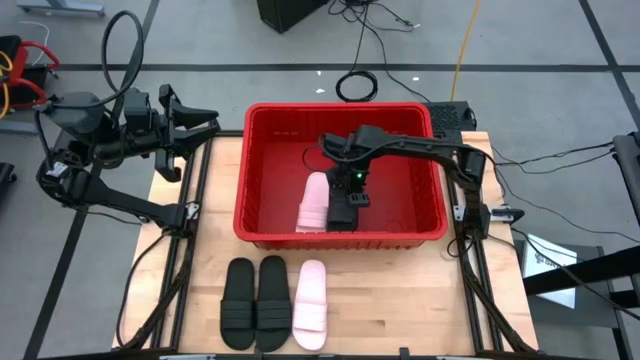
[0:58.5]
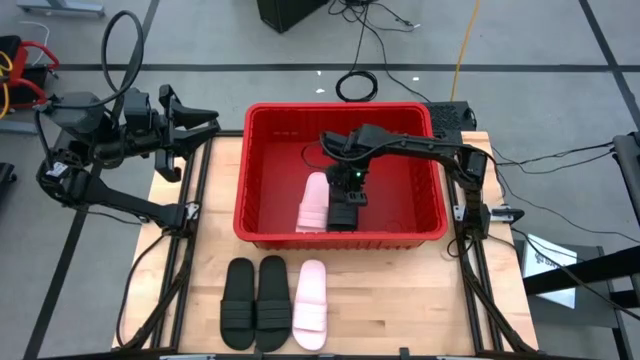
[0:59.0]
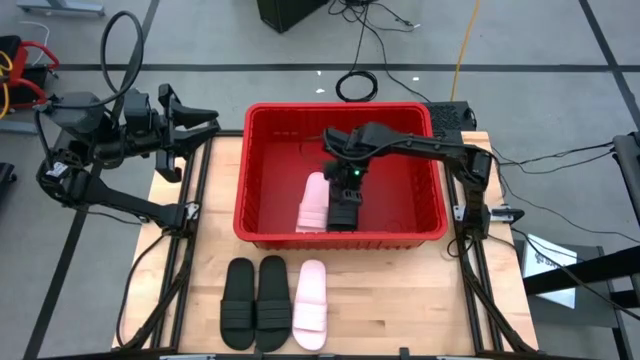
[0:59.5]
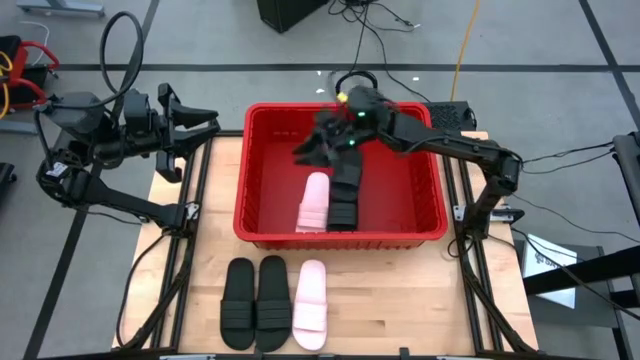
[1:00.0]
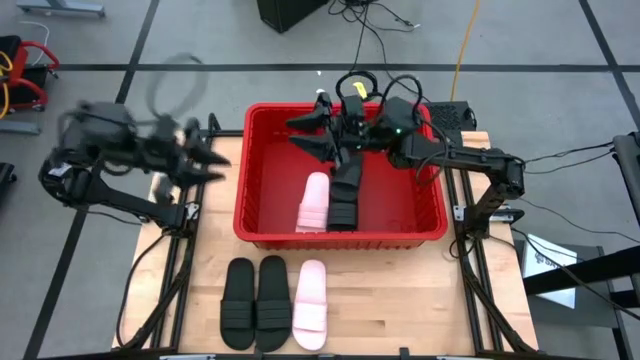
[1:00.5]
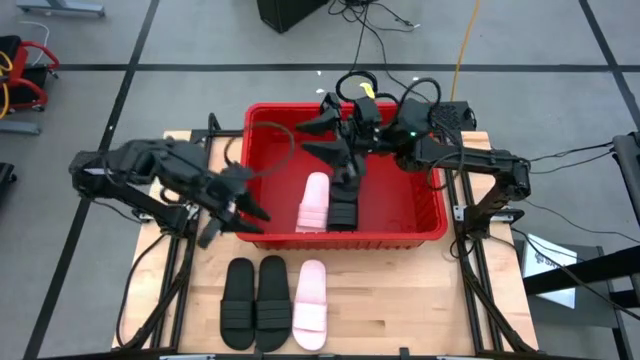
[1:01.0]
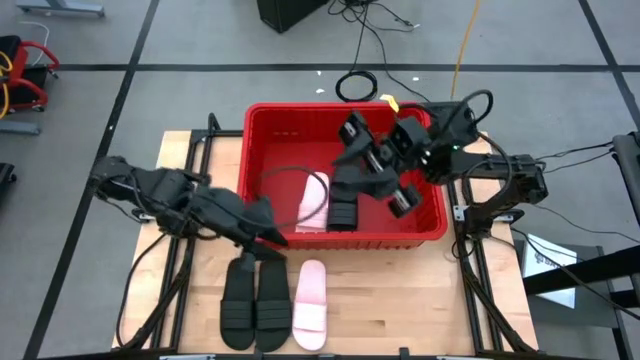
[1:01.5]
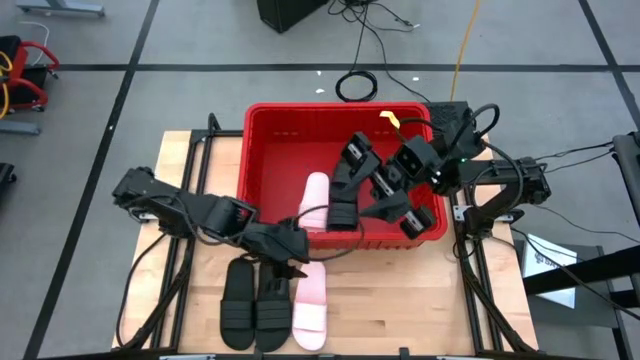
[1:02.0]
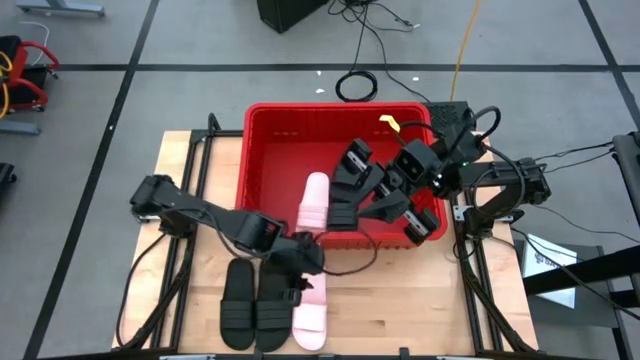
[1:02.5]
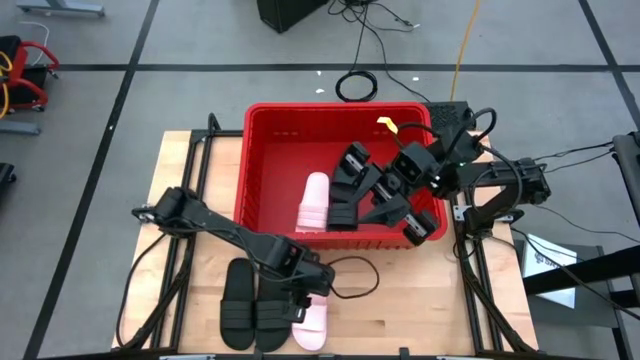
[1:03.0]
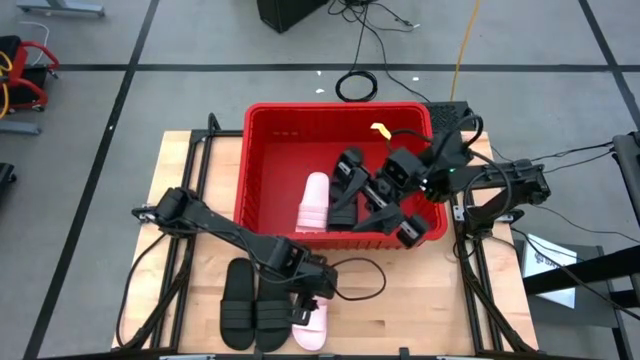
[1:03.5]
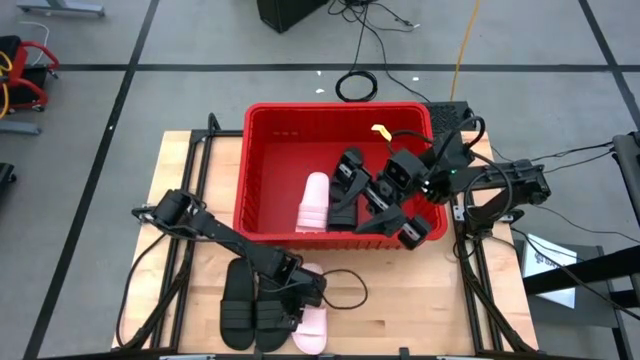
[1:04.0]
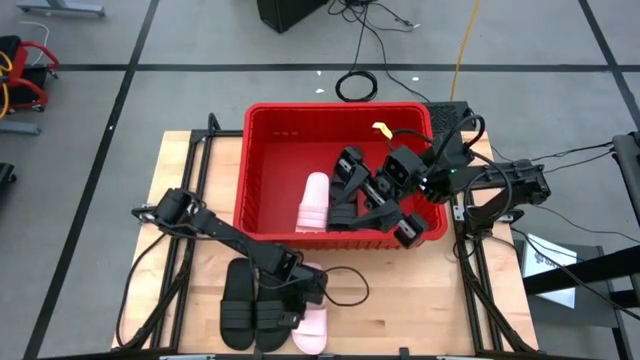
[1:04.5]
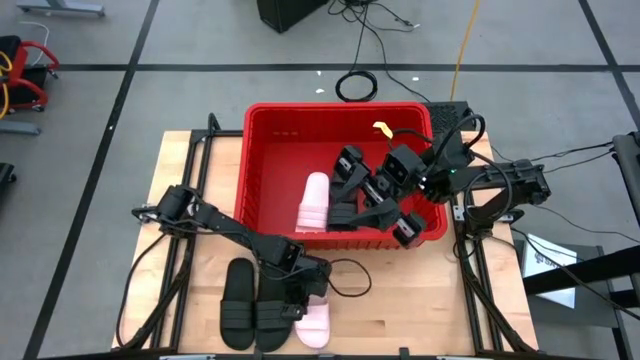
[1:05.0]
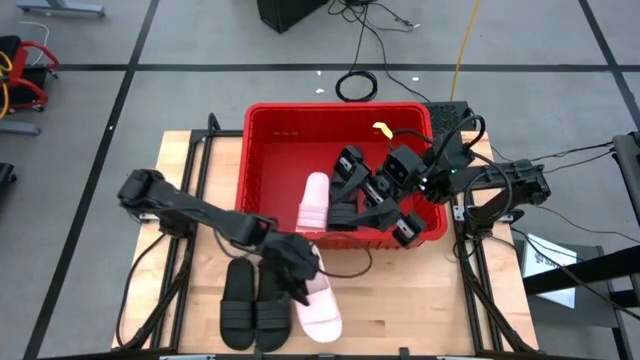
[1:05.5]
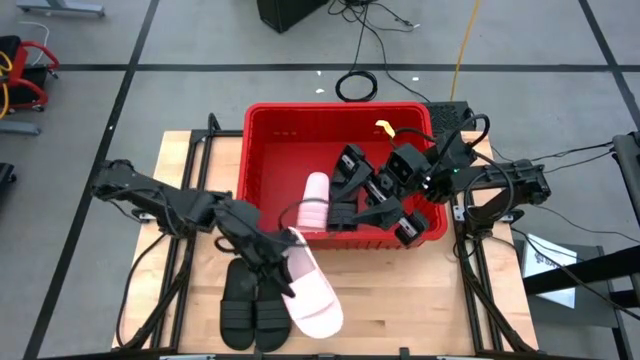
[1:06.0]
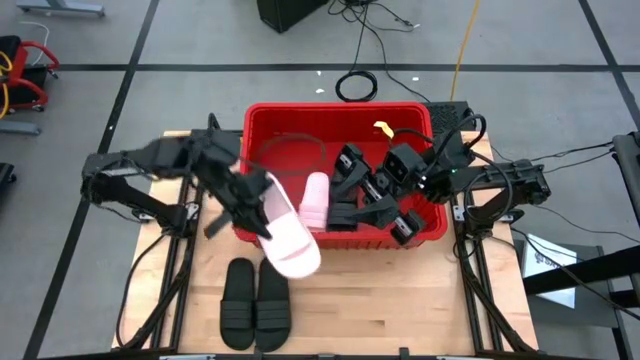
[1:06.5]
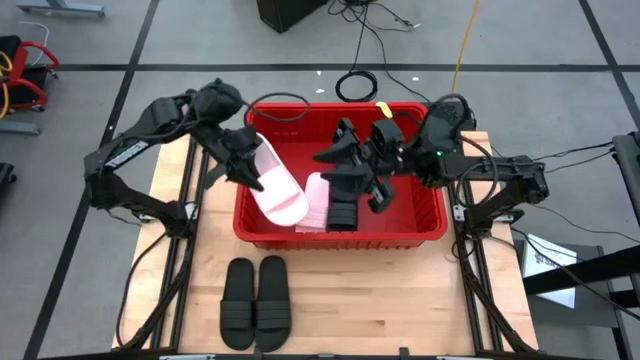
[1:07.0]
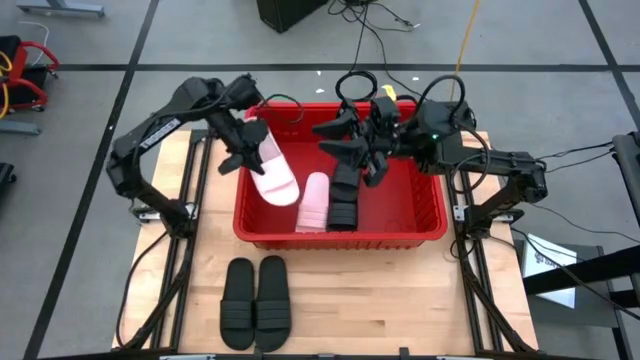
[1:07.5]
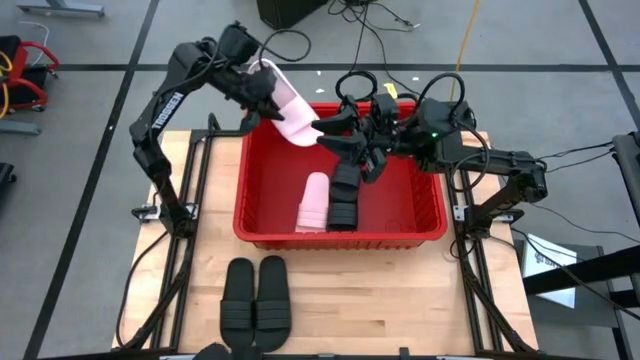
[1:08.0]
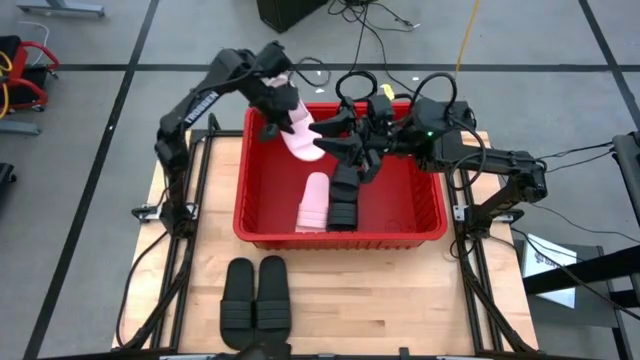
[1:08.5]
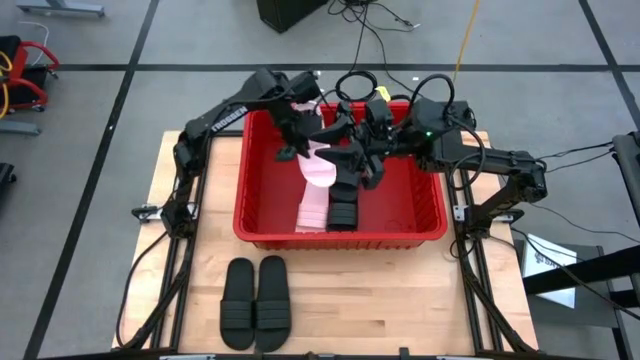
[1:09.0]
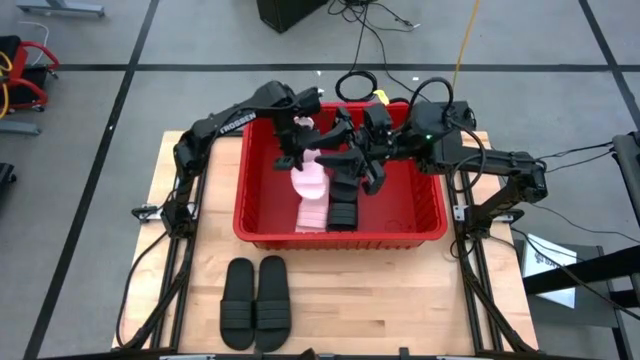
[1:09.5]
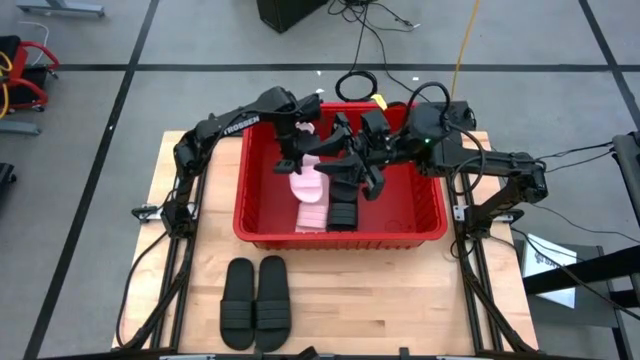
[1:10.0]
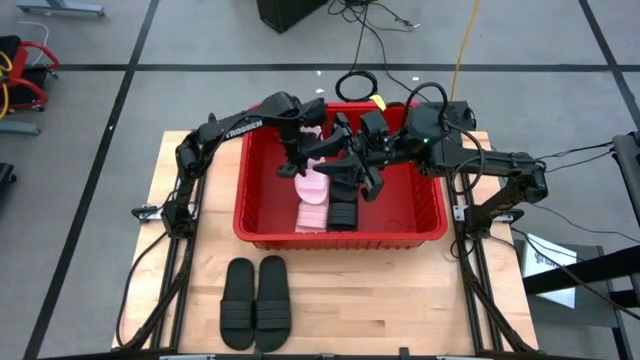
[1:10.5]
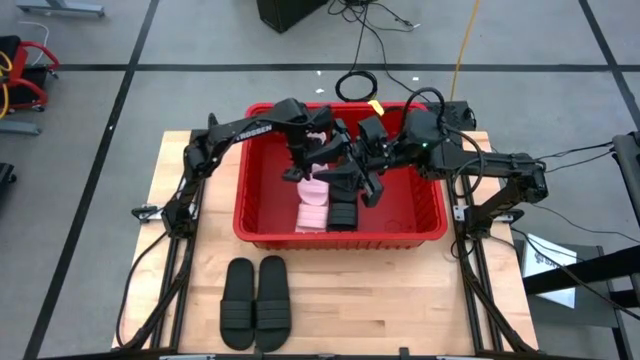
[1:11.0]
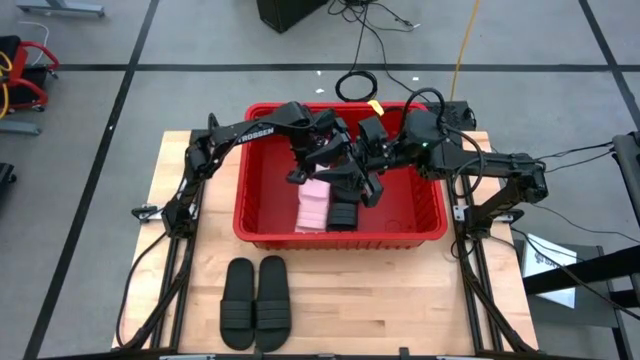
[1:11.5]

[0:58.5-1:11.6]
Task: Pick and place slides into bin
Put the pink slipper into the red bin
